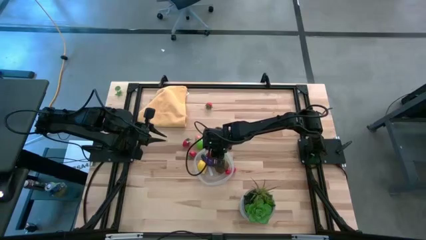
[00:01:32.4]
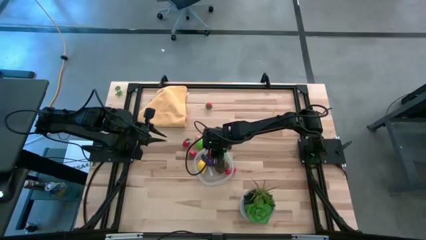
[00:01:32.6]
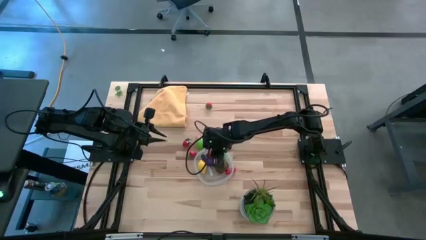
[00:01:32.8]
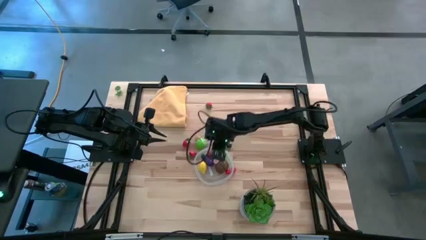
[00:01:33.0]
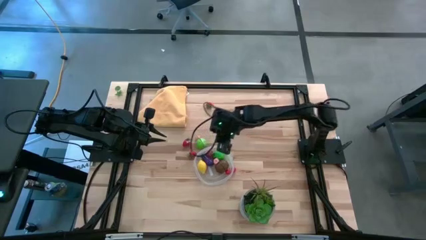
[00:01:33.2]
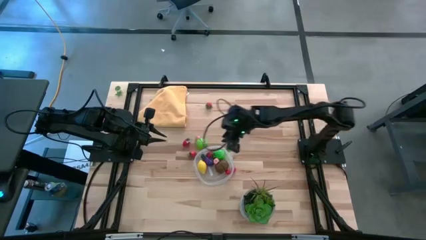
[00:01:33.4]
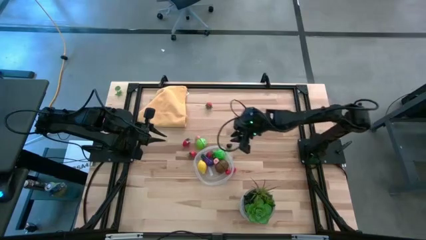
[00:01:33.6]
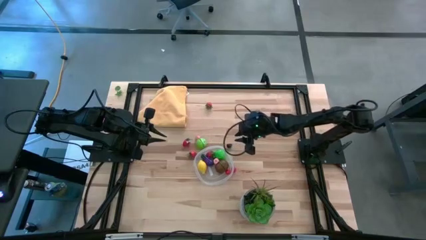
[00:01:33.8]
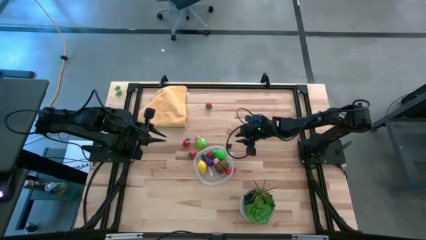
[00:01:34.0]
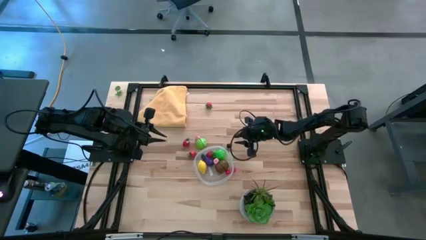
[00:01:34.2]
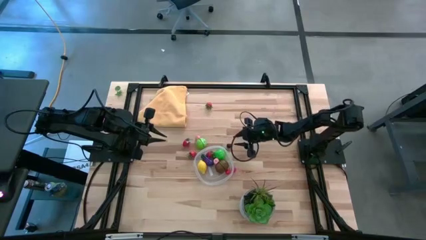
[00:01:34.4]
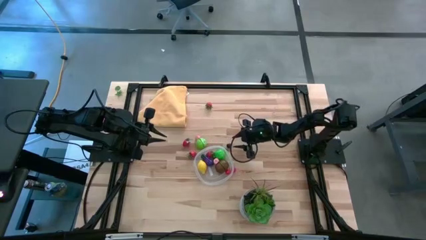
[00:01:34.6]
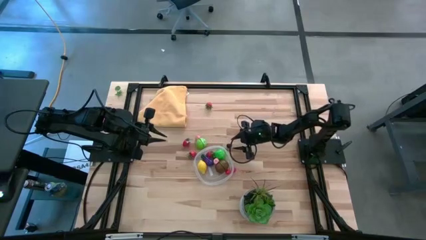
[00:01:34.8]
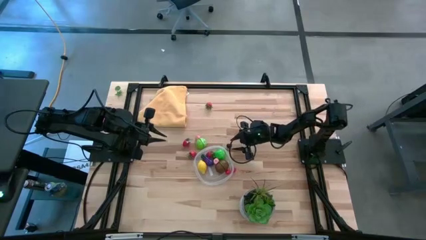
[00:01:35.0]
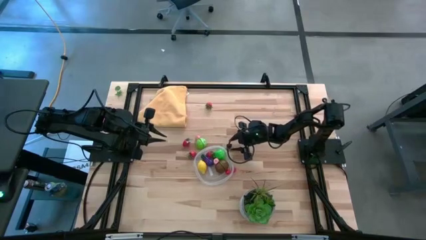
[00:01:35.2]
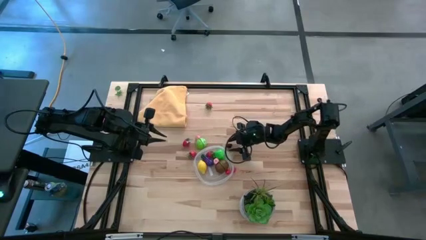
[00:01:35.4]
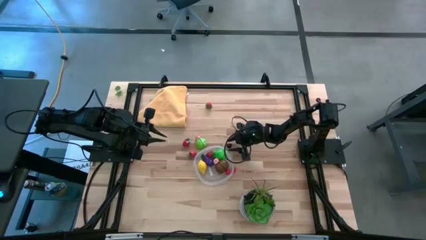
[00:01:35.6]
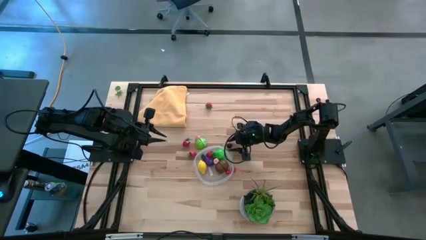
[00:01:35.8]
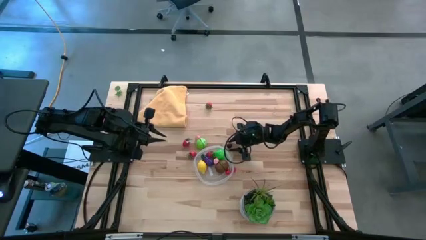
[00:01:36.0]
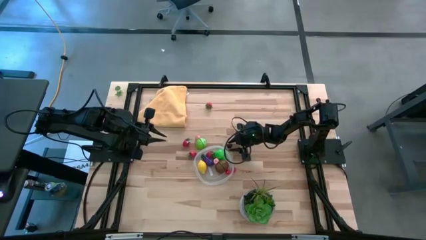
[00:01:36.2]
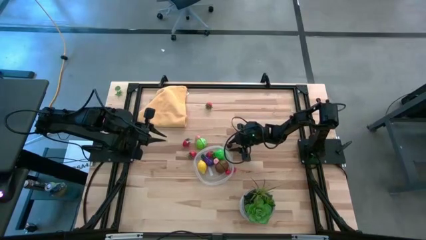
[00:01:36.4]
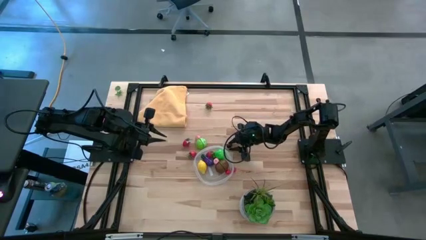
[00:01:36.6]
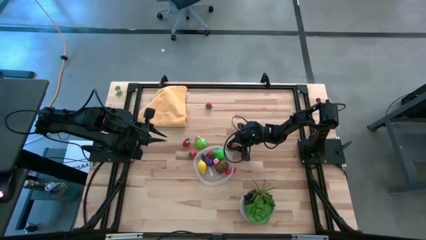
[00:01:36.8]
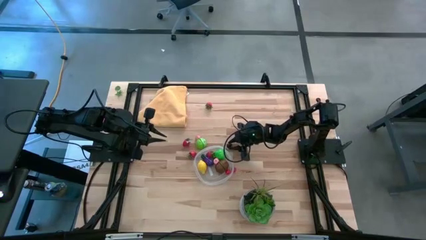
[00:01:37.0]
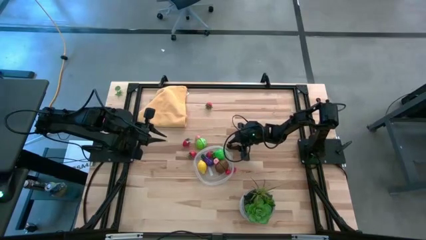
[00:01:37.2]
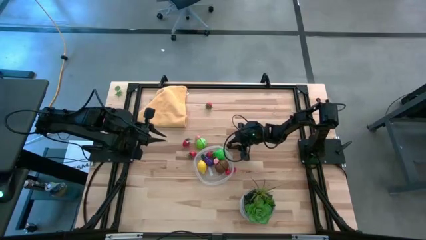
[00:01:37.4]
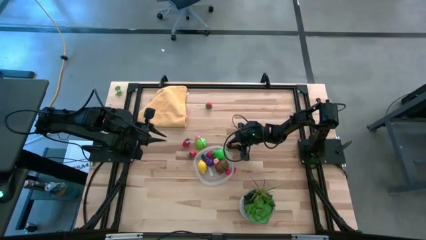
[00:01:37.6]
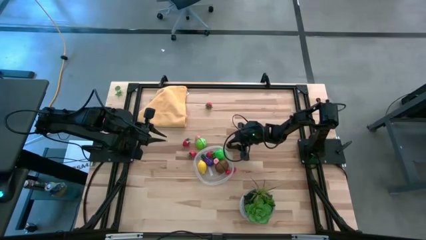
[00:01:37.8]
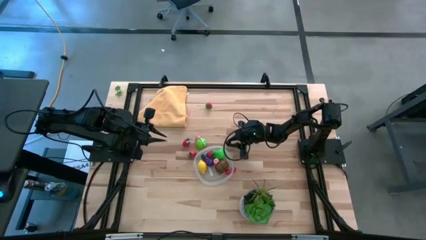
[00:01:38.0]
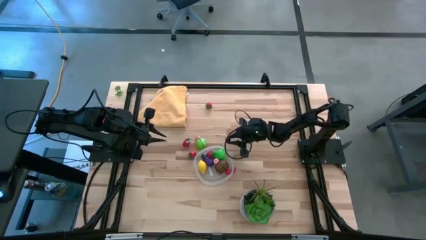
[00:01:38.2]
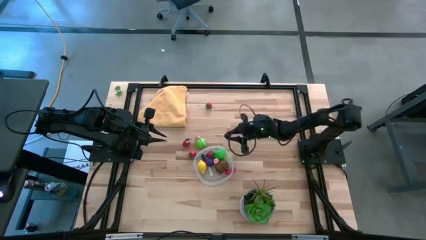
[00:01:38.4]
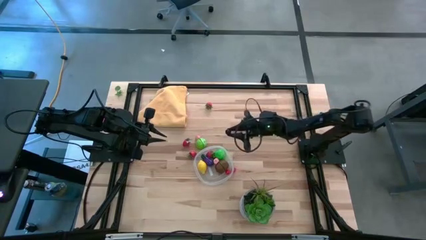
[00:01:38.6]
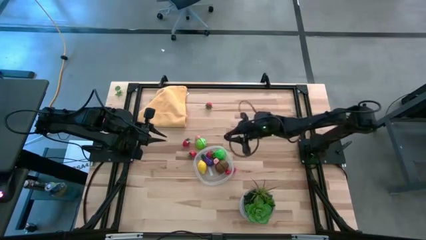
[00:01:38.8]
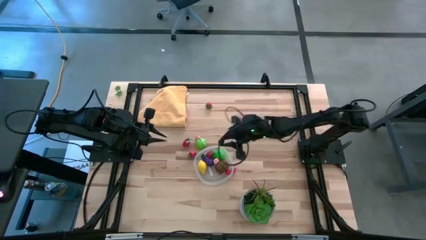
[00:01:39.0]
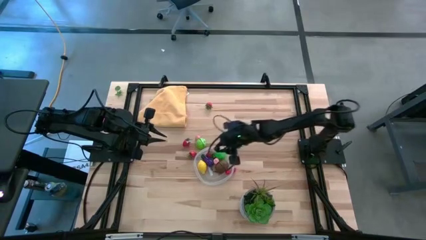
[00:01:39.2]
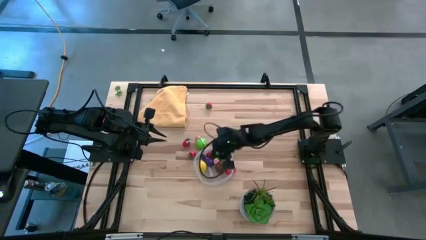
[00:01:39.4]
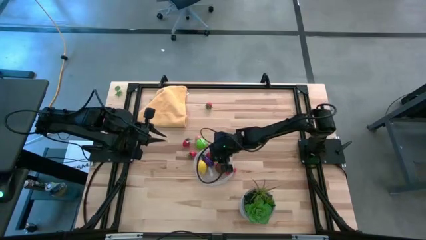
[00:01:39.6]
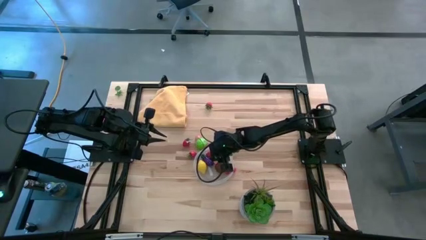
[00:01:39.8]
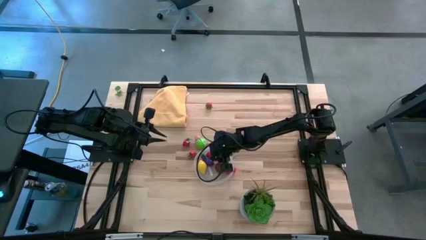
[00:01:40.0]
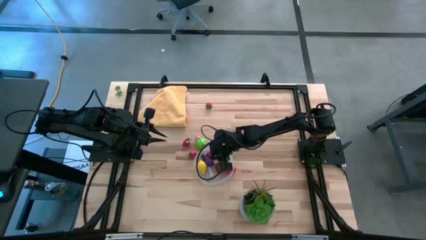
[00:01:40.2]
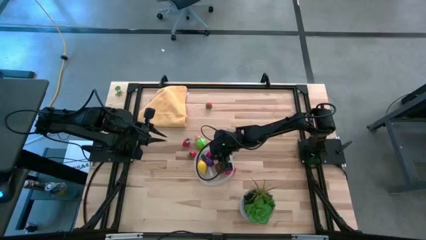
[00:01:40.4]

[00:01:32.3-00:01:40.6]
Task: Pick and placing Produce into tupperware
Put the black raspberry into the transparent bin

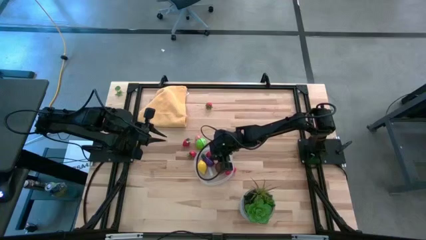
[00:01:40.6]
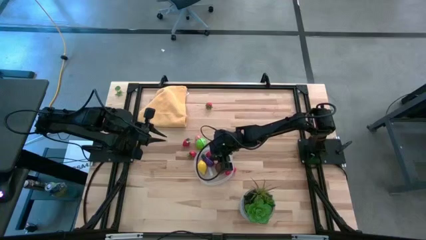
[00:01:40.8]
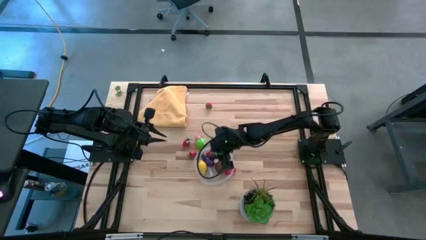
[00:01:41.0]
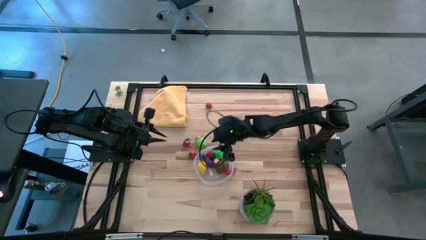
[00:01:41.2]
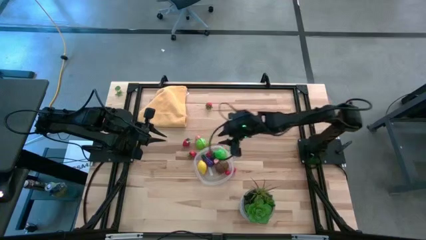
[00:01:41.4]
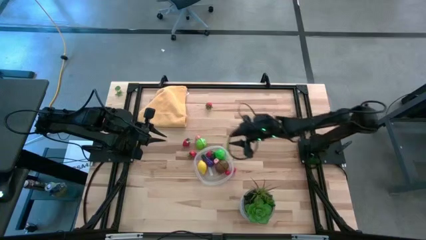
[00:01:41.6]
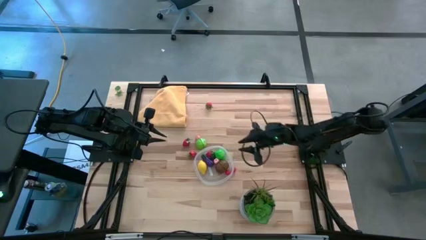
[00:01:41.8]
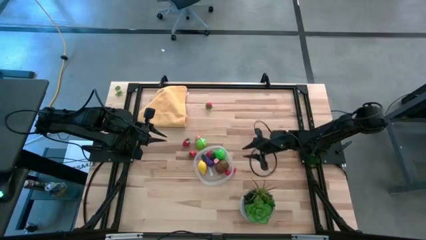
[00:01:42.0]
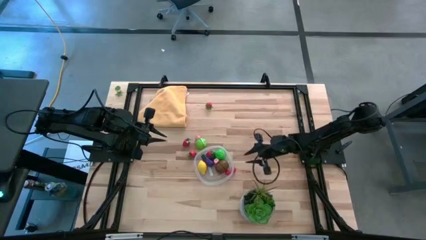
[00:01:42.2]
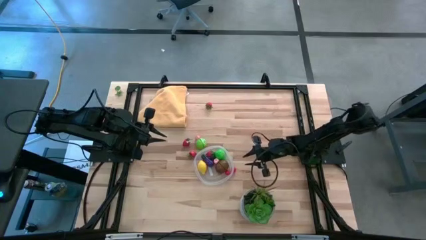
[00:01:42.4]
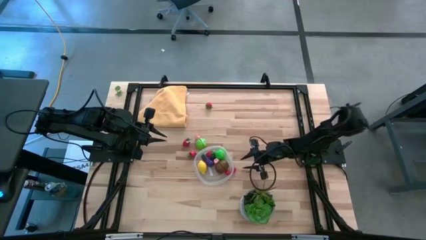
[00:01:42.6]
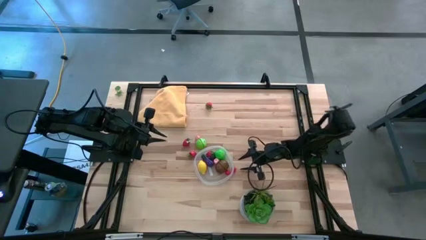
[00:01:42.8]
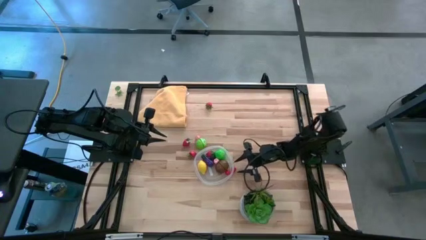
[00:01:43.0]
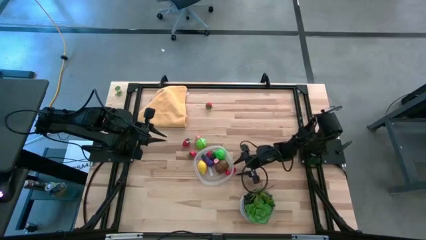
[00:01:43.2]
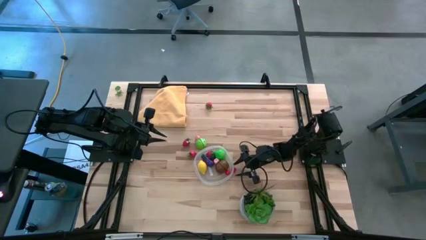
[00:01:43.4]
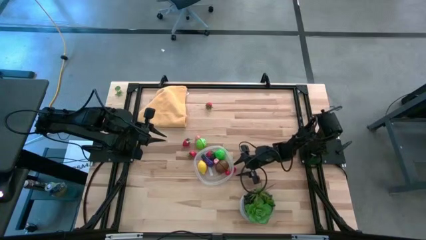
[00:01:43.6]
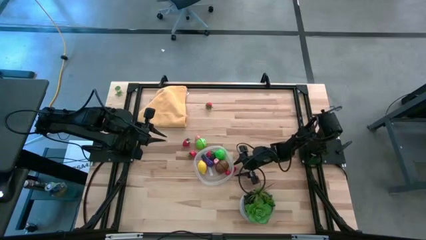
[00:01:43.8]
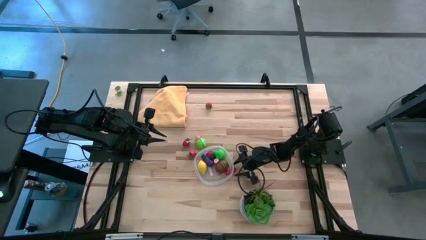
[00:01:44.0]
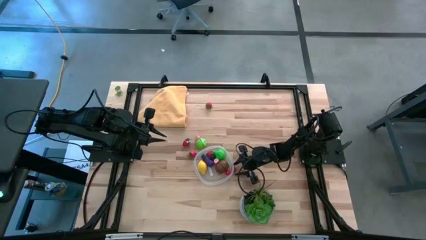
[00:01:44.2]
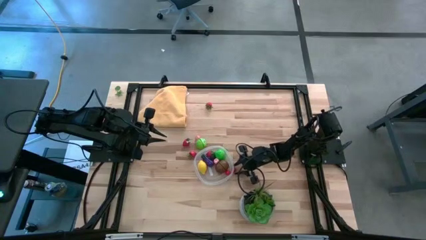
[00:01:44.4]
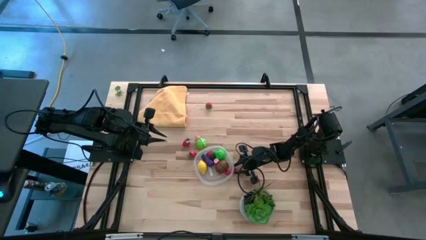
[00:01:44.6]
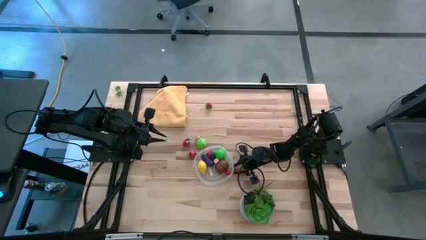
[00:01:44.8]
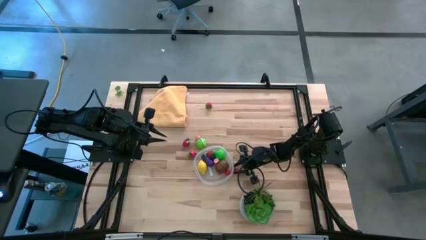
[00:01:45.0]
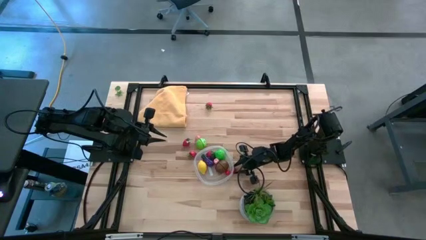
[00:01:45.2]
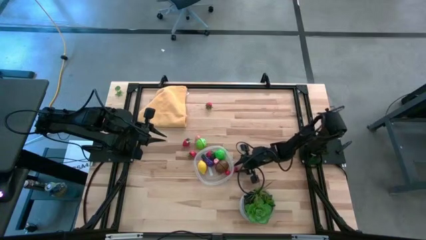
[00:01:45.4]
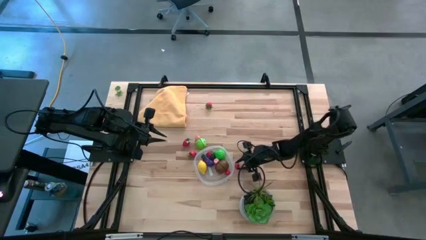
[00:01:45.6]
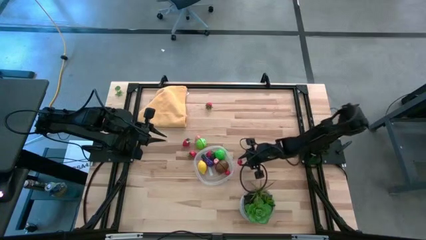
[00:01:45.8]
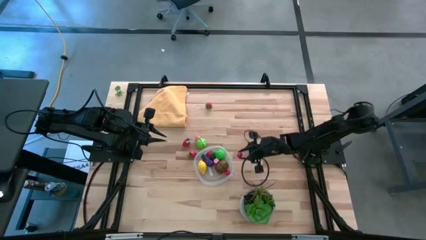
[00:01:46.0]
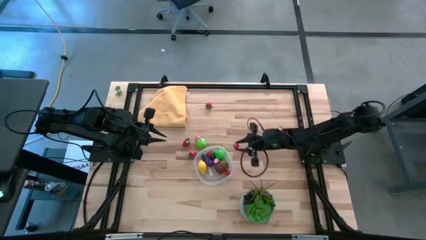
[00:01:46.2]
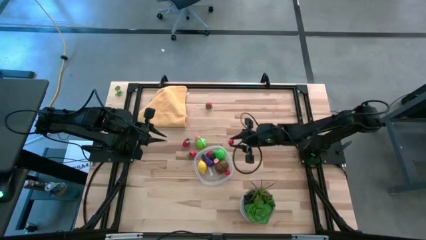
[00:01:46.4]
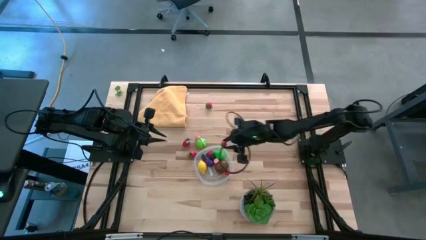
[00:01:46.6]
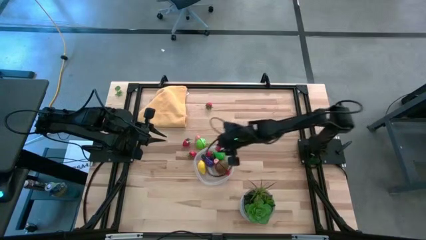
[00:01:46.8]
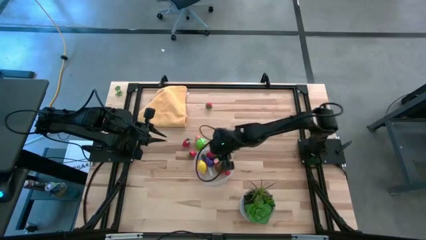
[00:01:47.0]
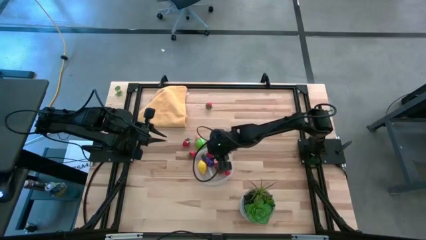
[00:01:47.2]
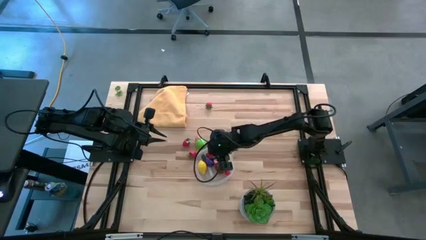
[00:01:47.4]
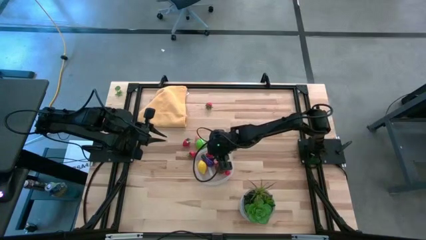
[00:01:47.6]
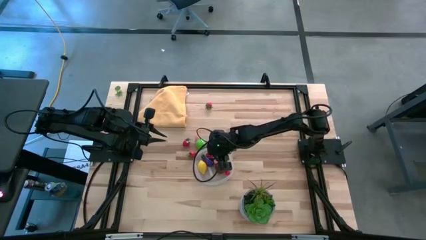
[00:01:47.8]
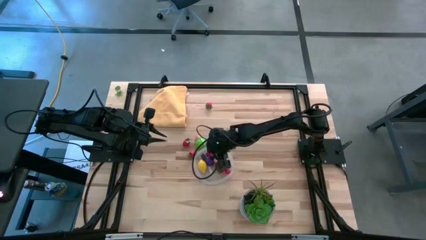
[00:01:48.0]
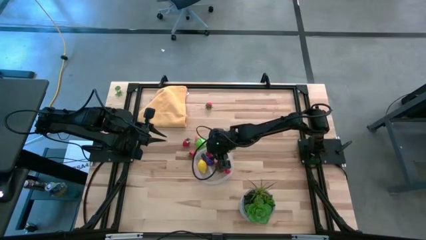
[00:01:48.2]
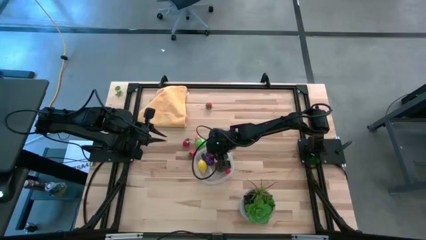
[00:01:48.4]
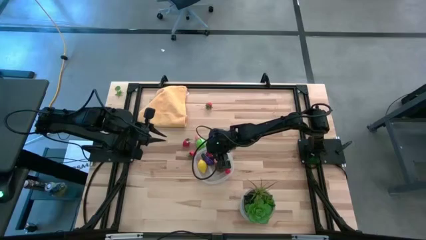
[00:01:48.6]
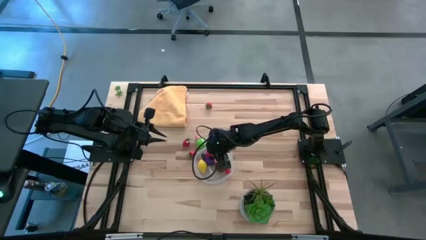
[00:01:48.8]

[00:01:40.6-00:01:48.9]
Put the red cherry into the transparent bin
